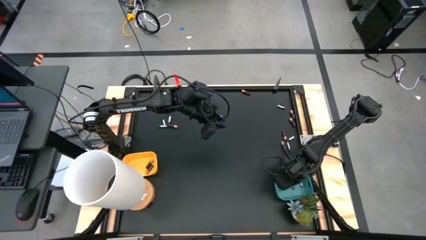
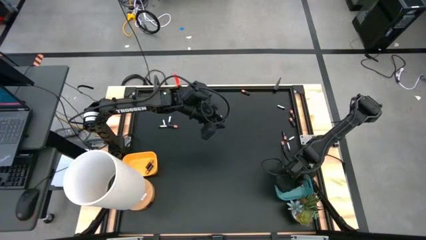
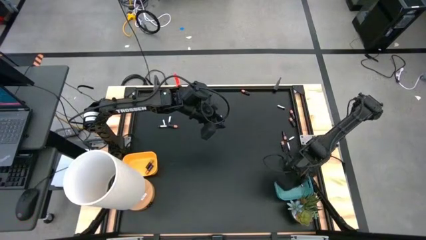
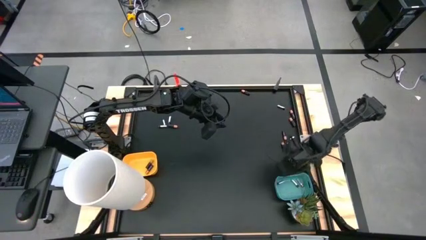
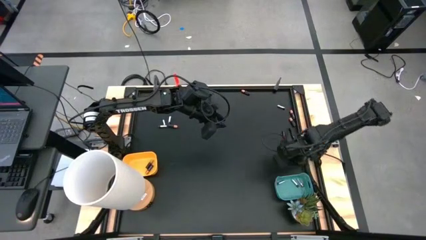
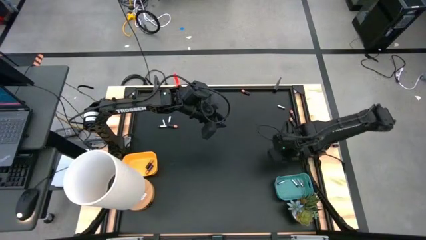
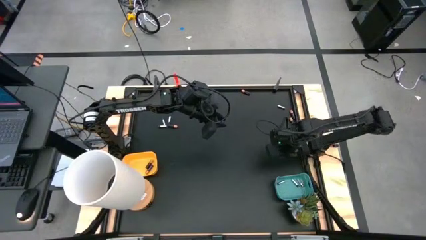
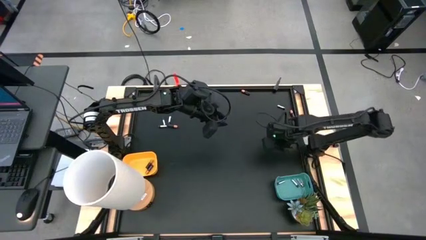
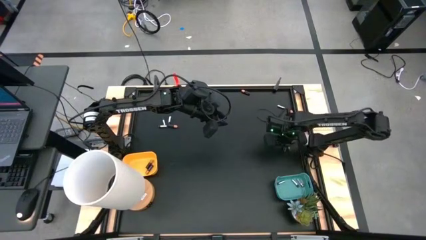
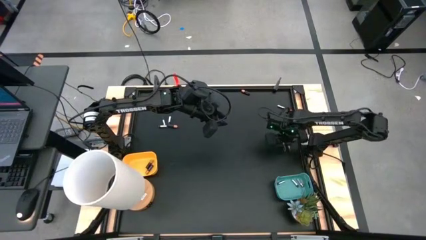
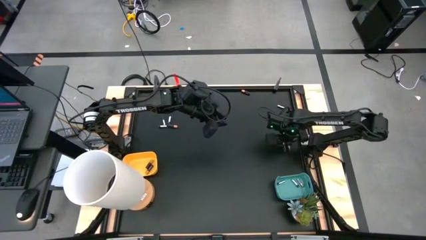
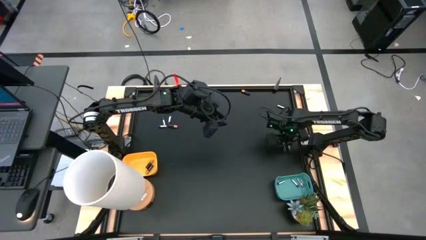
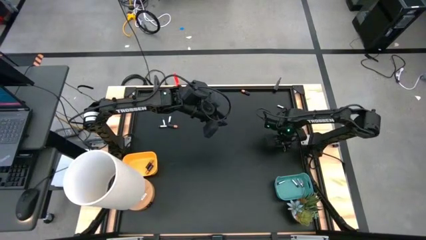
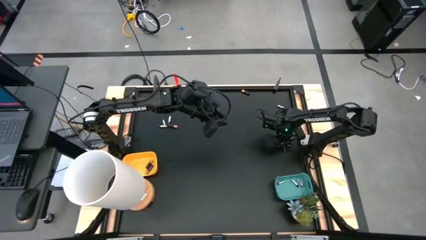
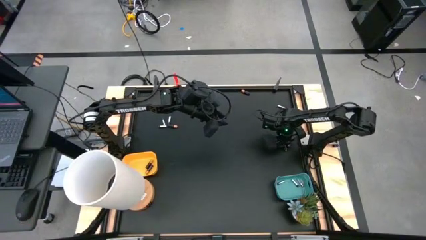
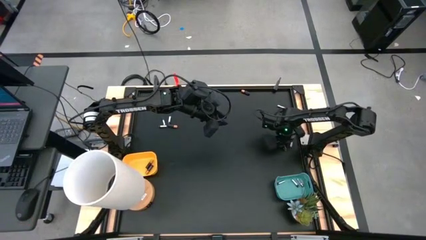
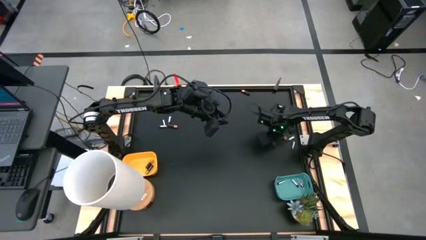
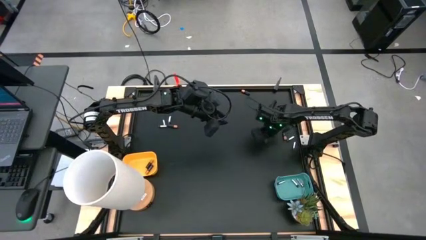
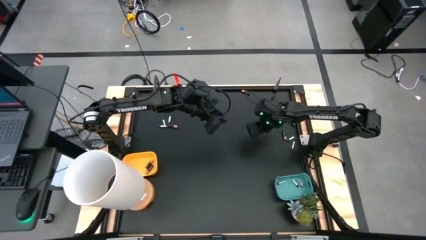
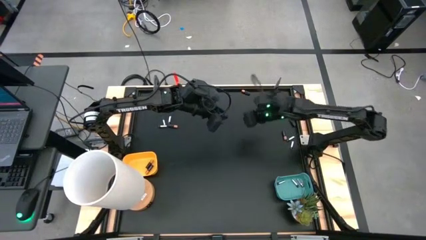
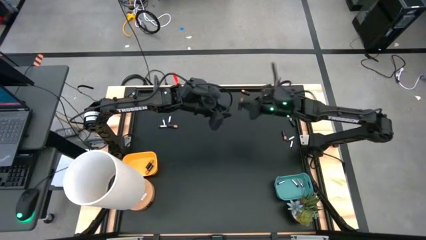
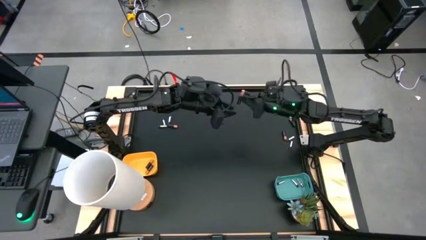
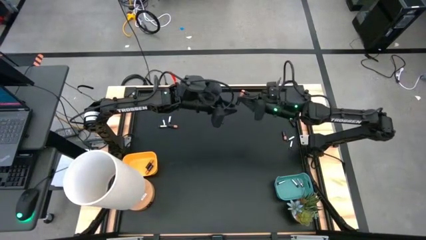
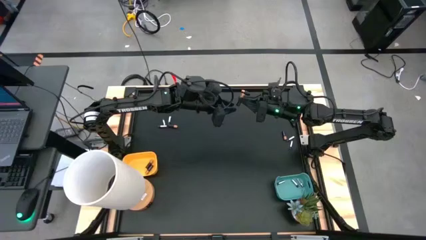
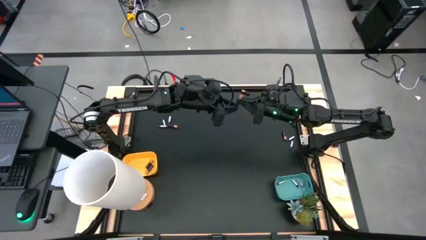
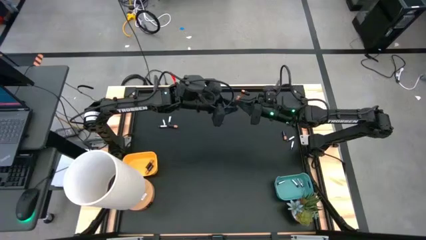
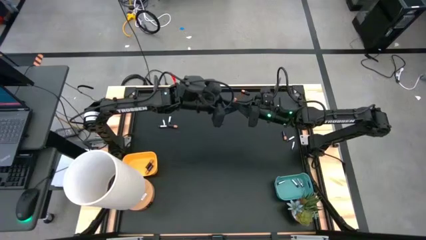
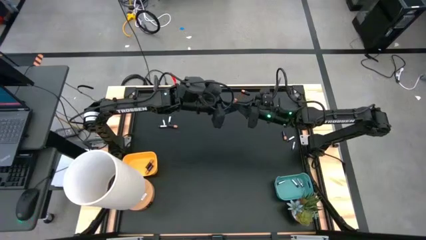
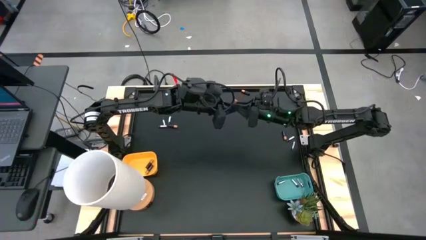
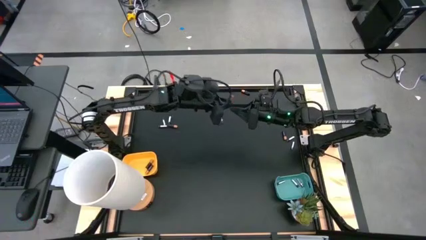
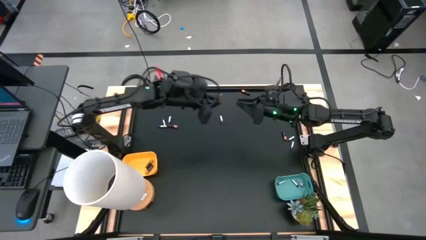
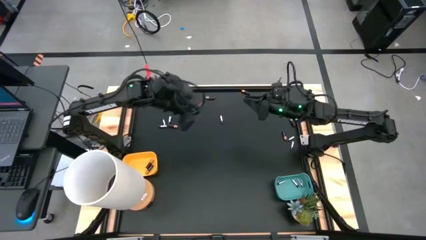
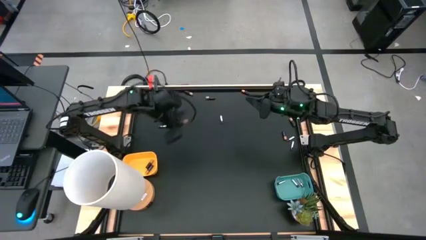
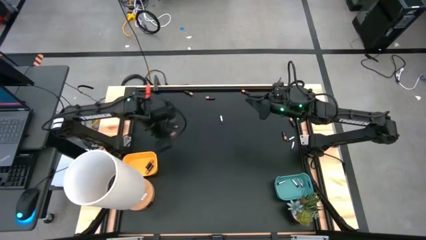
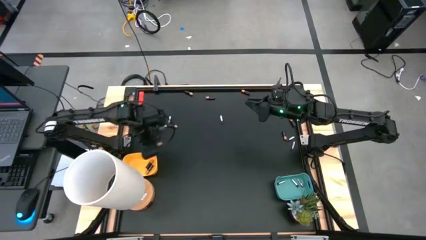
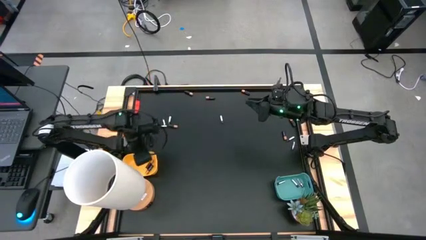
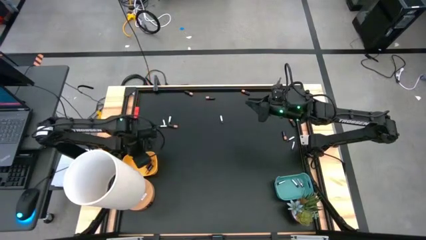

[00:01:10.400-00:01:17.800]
Task: Sort batteries
Put the black battery into the yellow bin

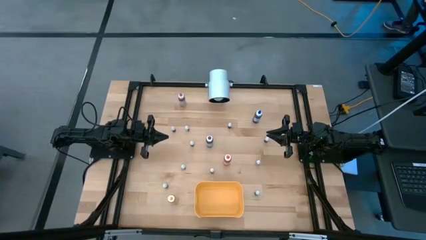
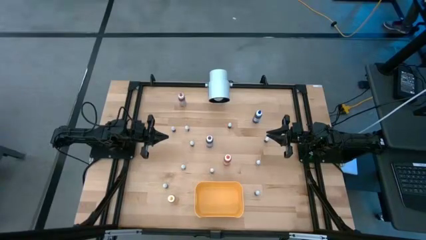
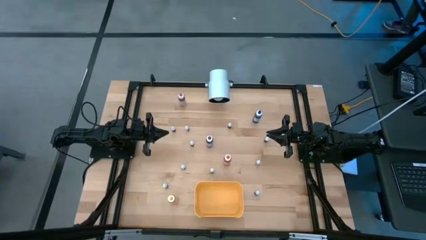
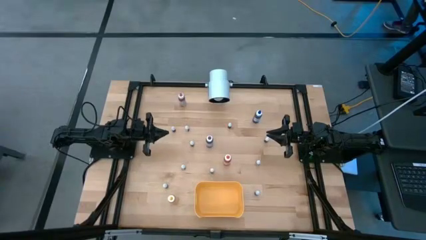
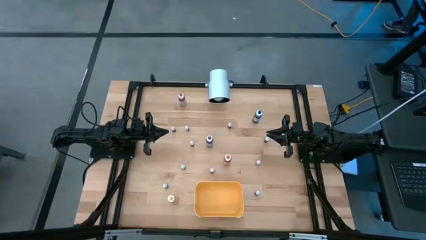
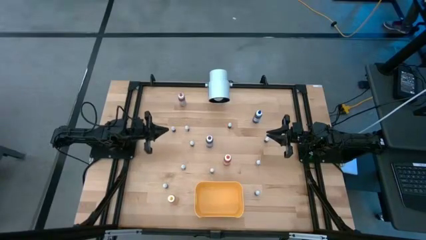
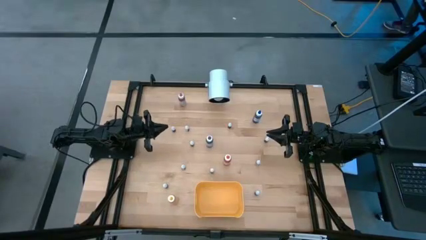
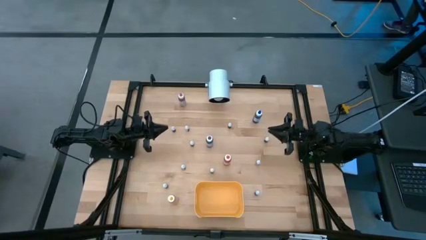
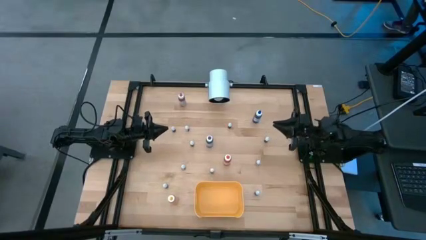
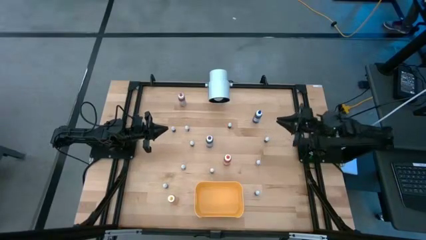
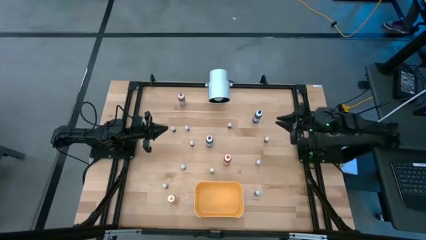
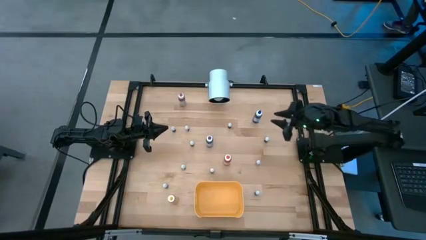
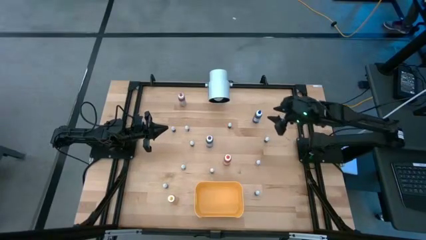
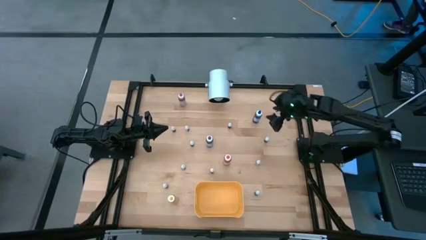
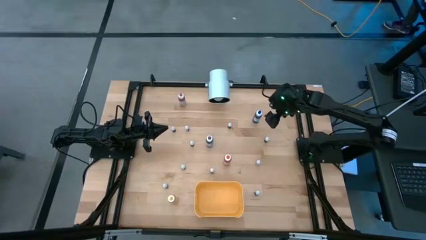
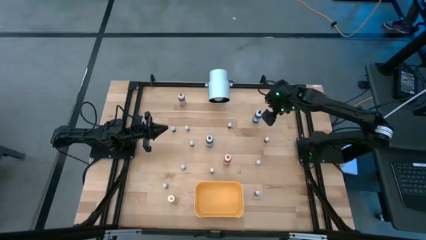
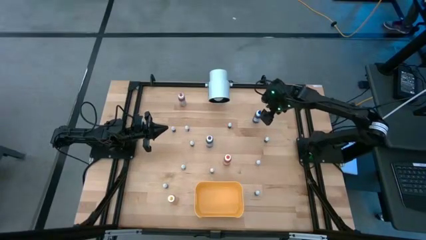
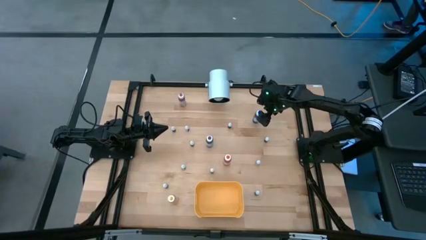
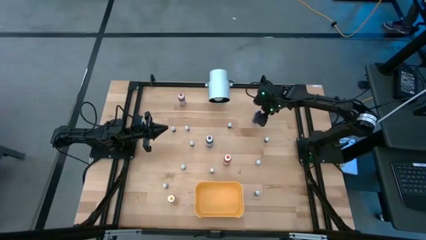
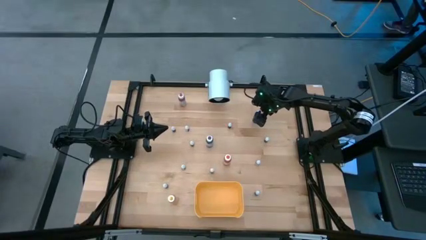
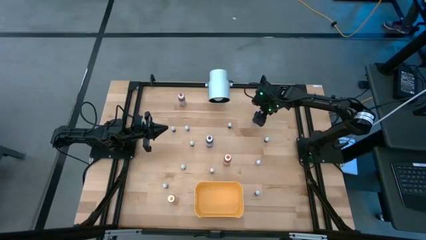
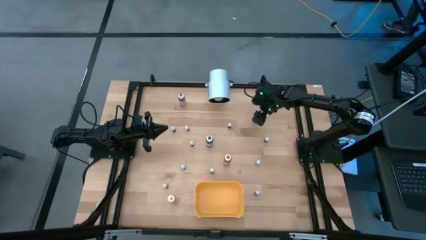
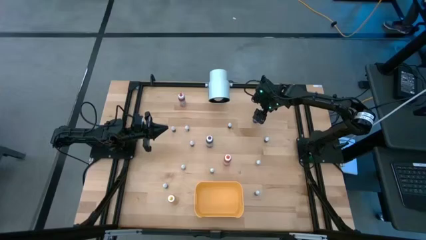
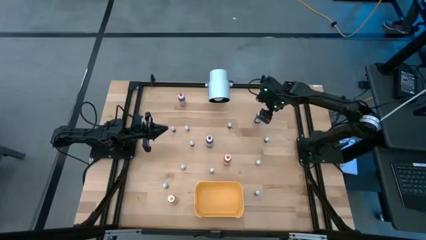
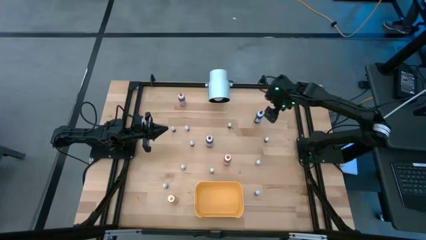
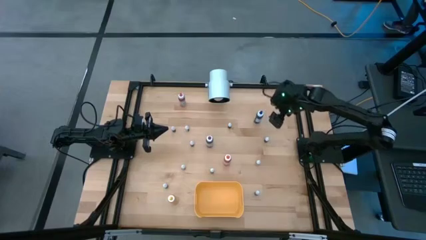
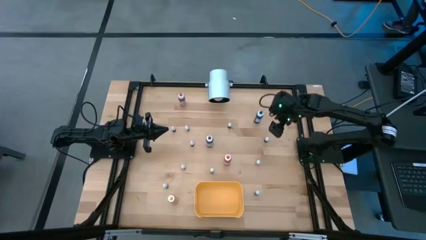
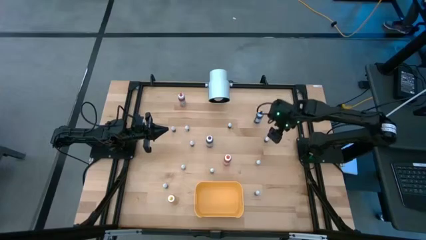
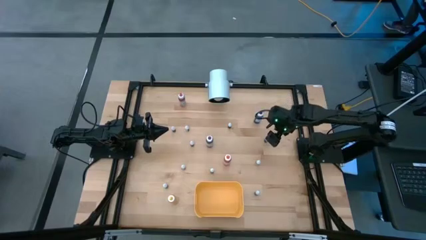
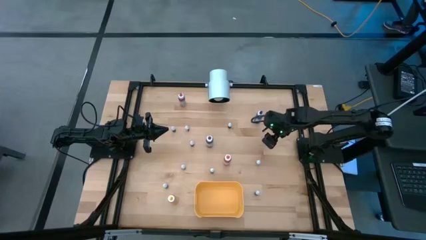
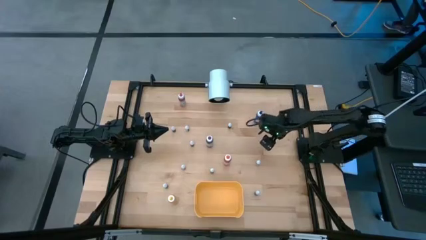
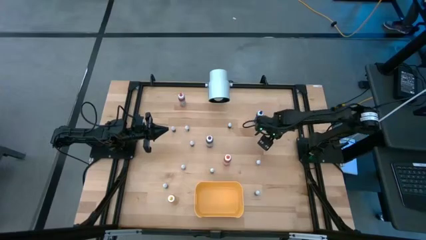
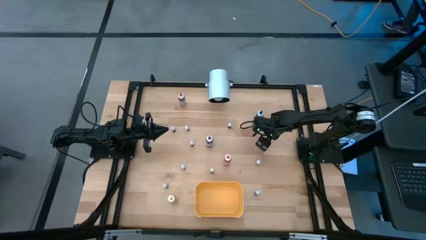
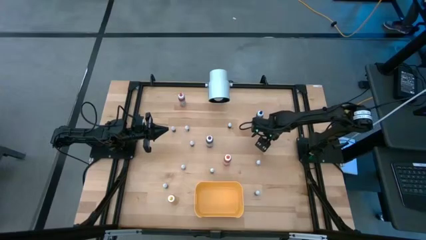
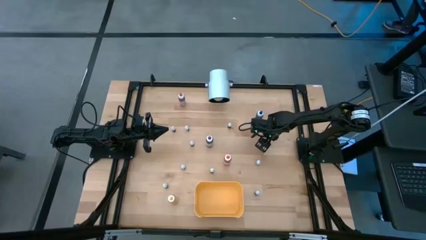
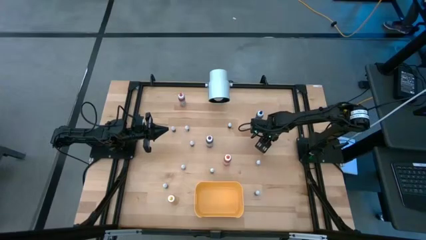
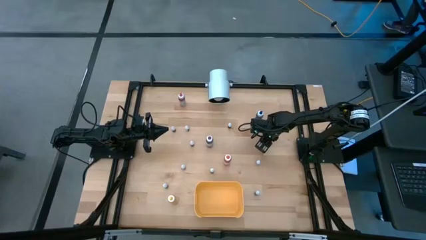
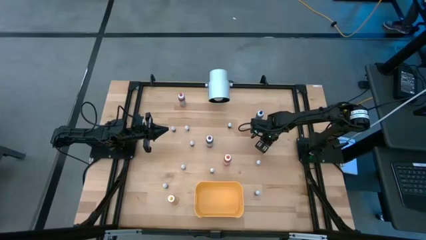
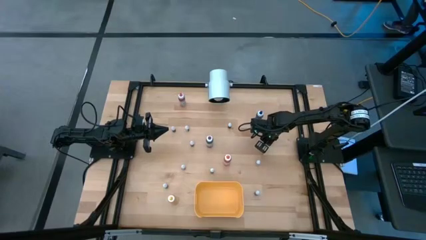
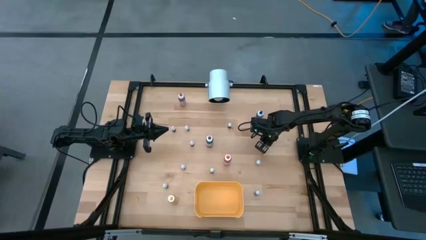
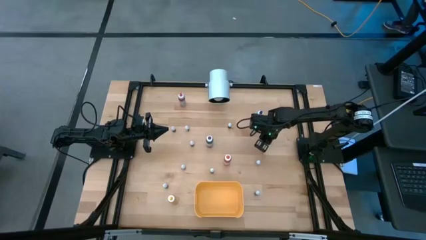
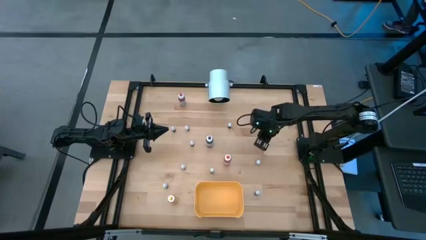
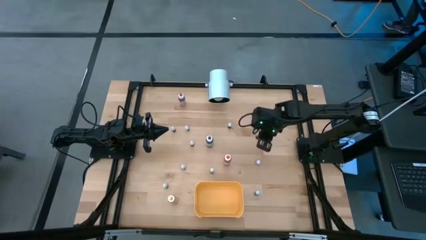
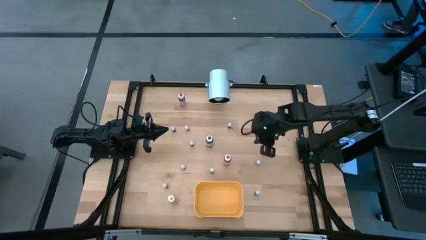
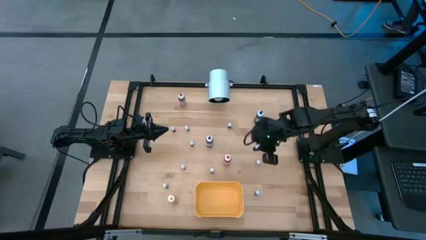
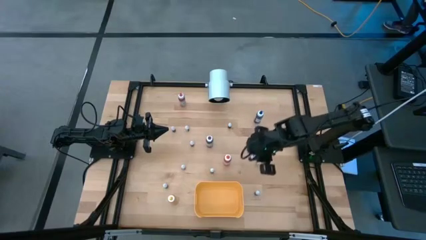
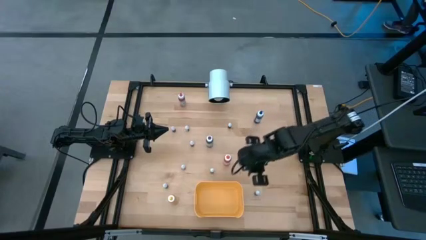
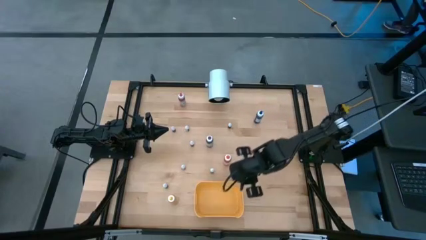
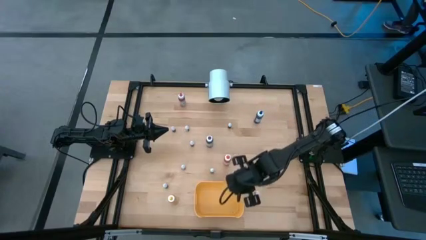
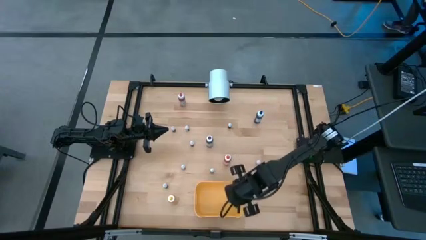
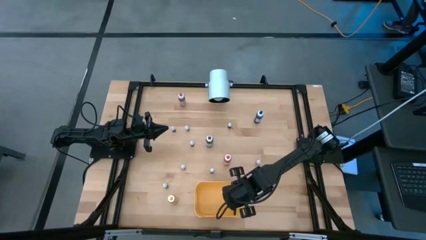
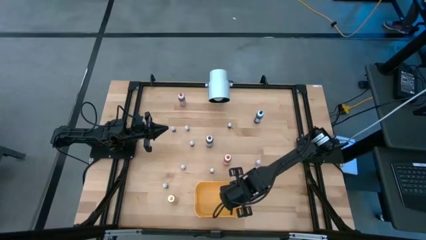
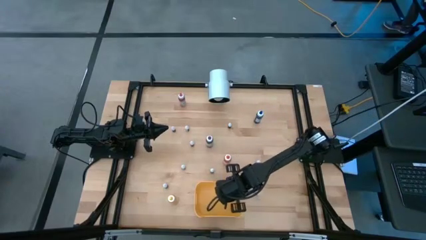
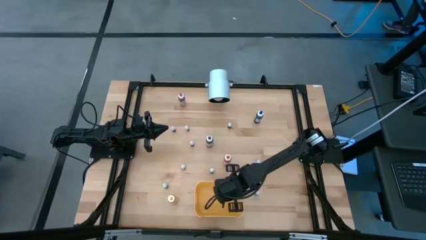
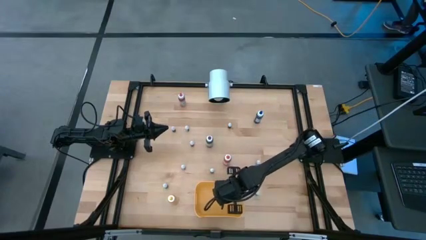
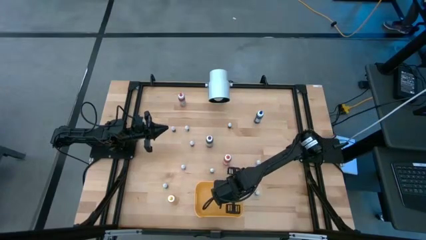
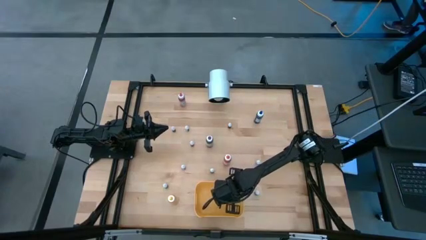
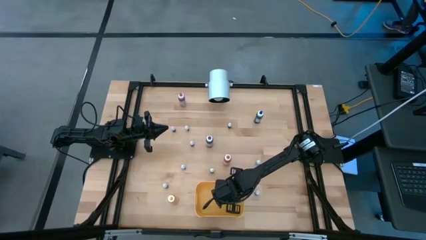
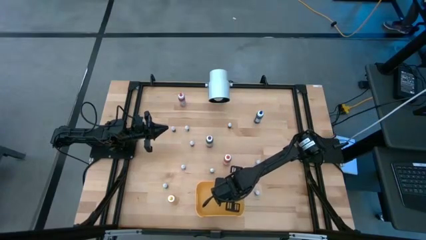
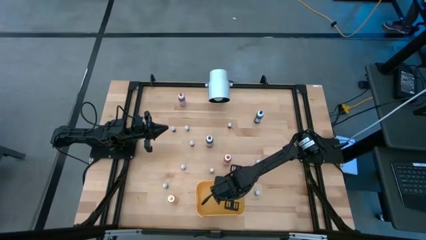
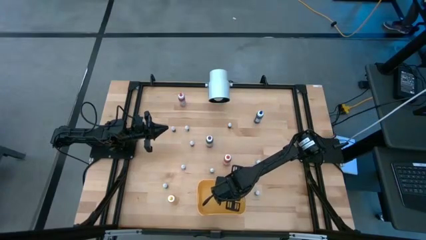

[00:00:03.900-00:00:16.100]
Task: Pick & Place food coloring
Put the middle small black food coloring bottle into the yellow container
